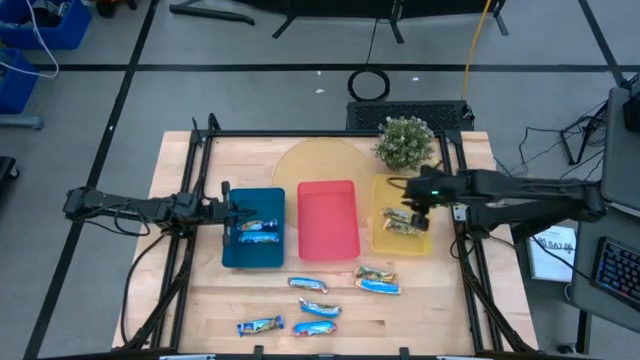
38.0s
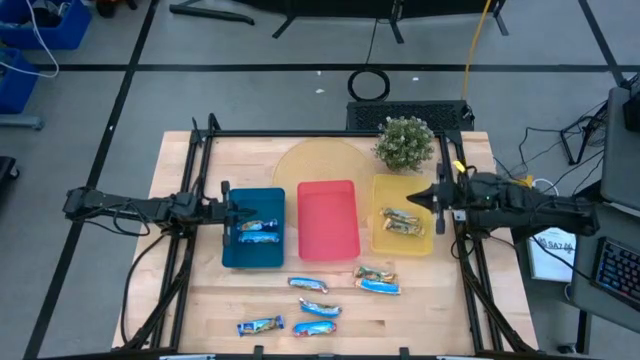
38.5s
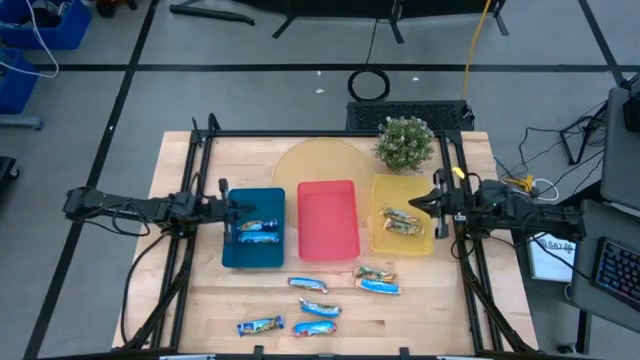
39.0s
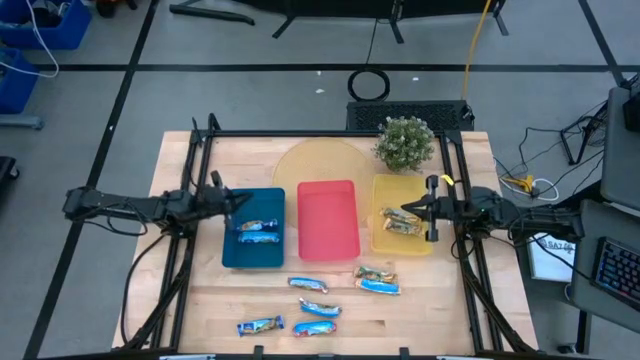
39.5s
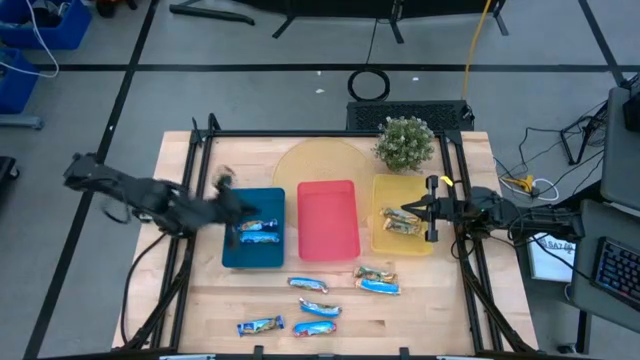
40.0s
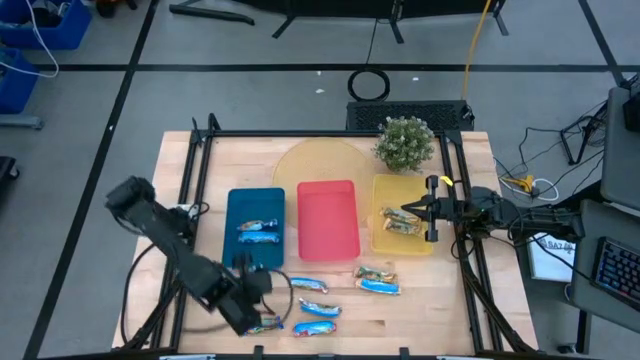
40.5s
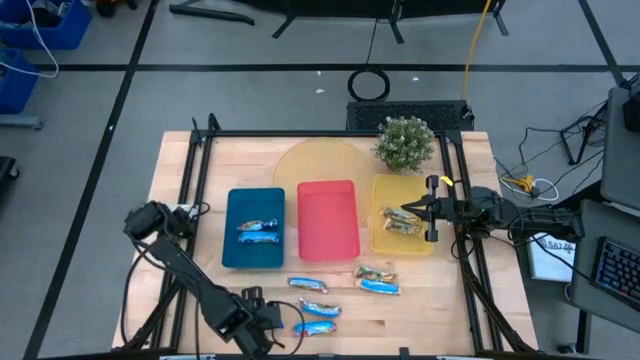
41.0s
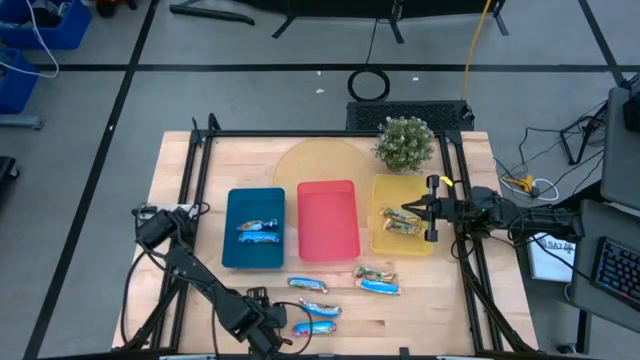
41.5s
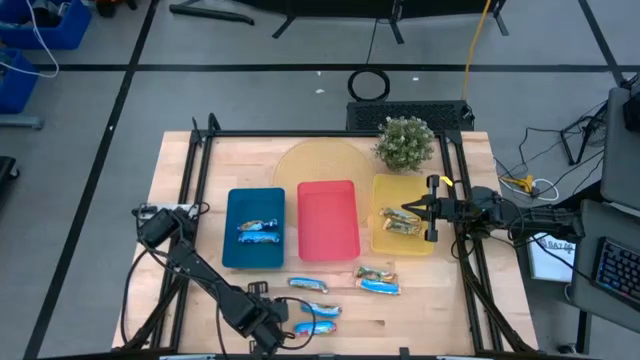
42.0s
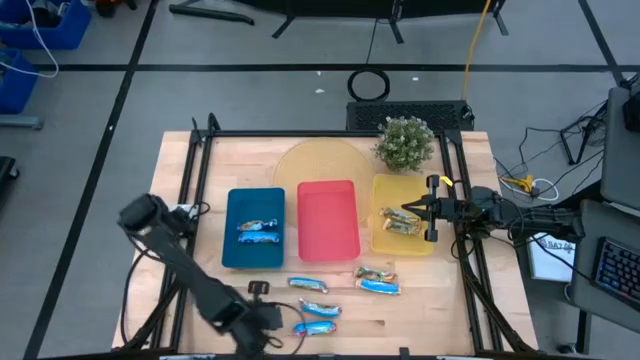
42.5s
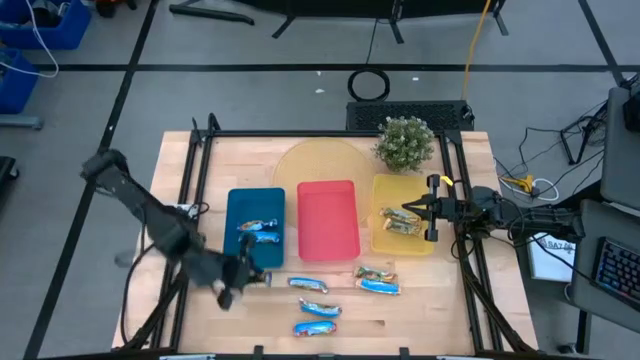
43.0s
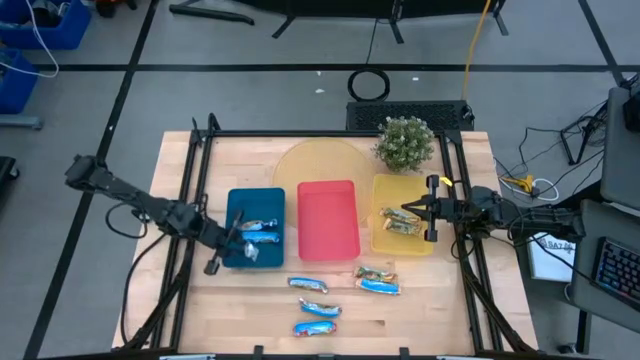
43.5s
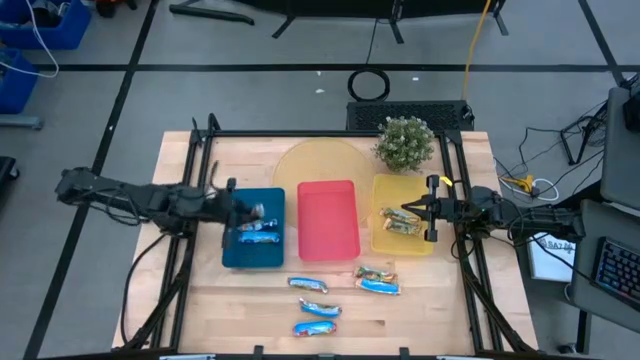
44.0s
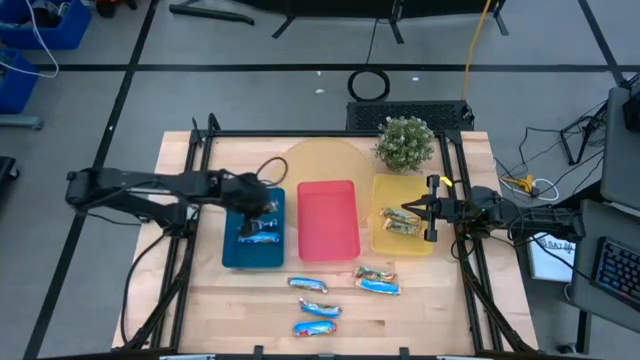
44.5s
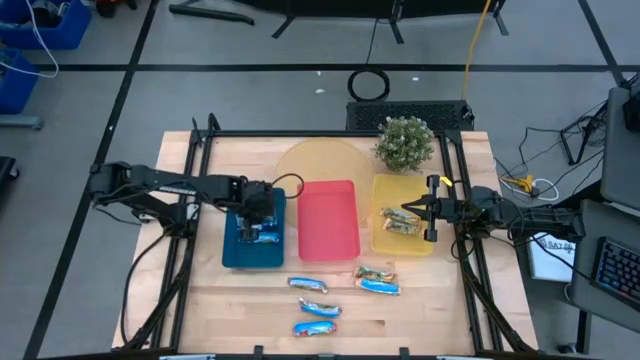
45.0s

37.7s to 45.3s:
Task: Pick and place Granola Bars by type
Put the blue granola bar into the blue bin

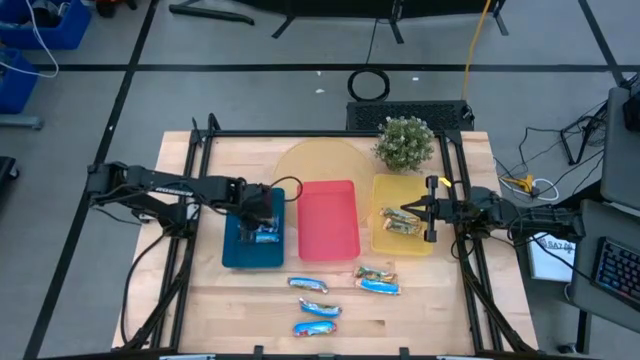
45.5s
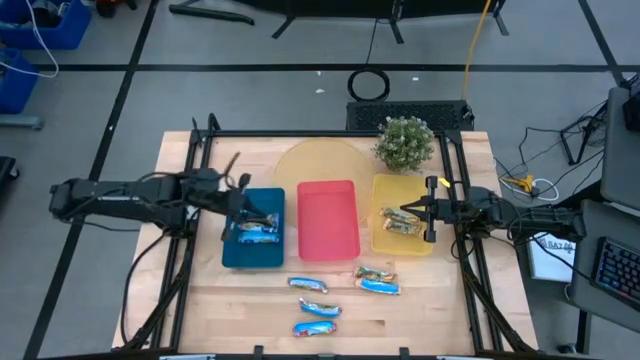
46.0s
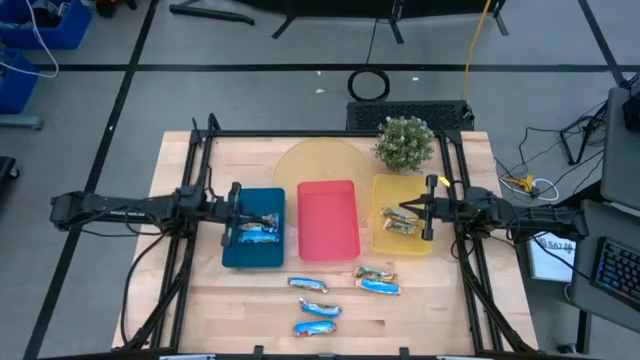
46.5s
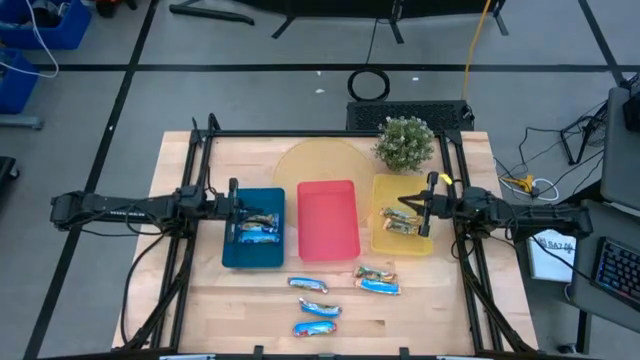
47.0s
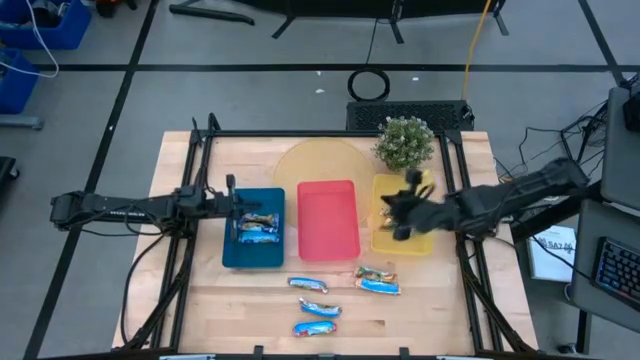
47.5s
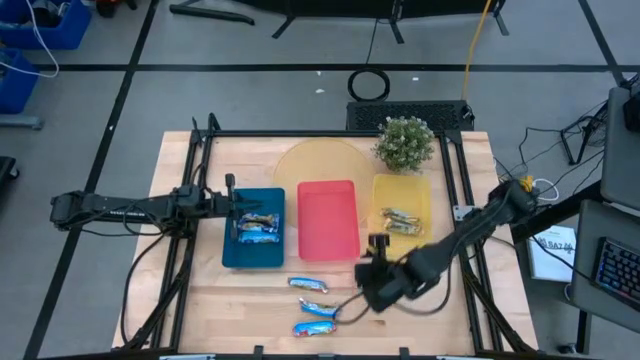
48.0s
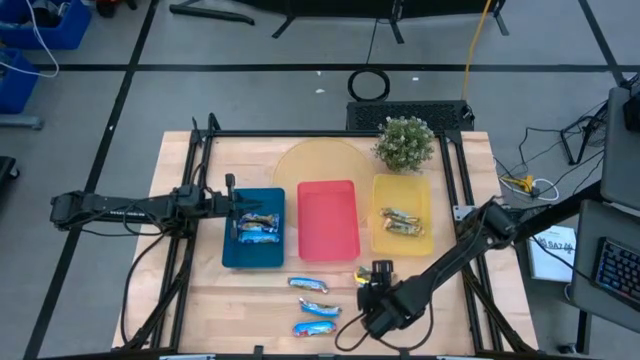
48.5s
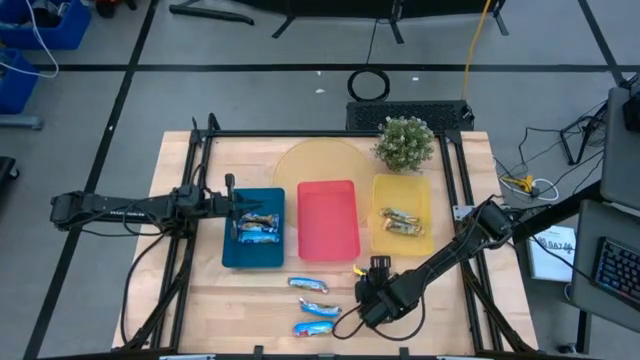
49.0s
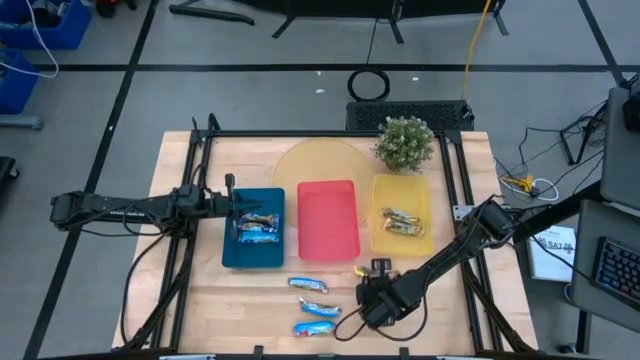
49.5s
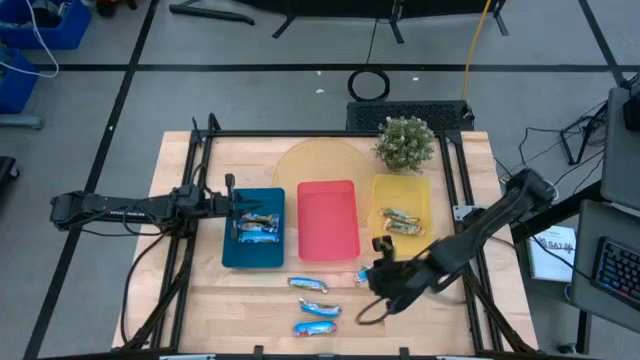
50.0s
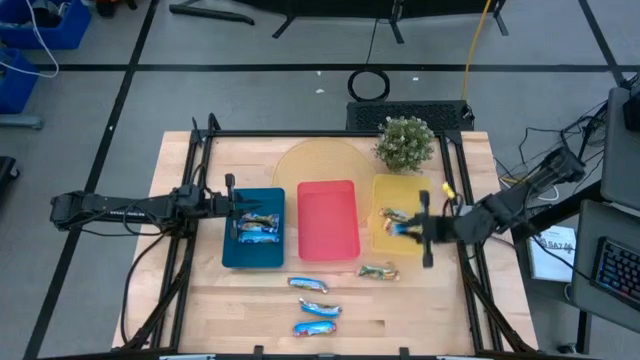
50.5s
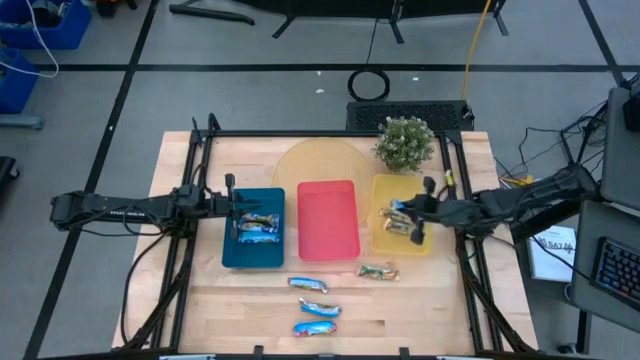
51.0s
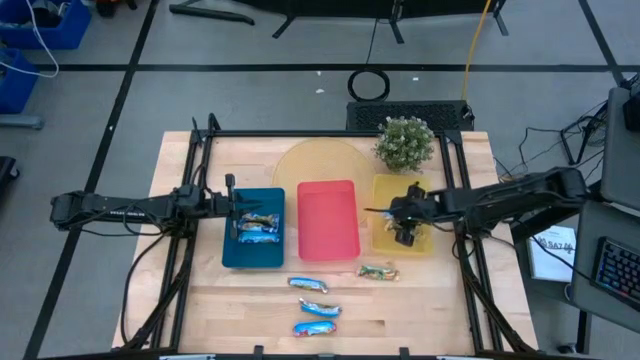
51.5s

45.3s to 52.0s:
Put the yellow granola bar into the yellow bin

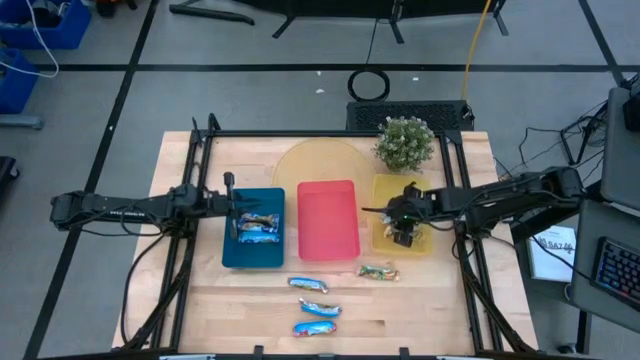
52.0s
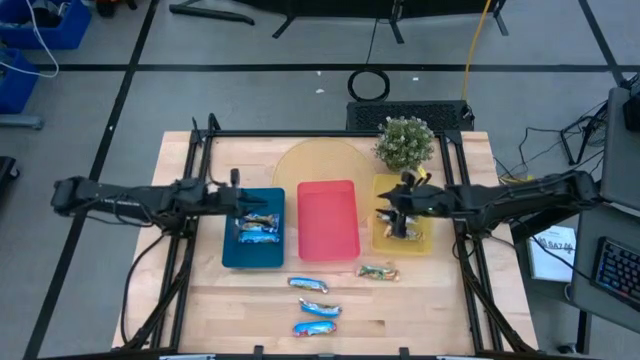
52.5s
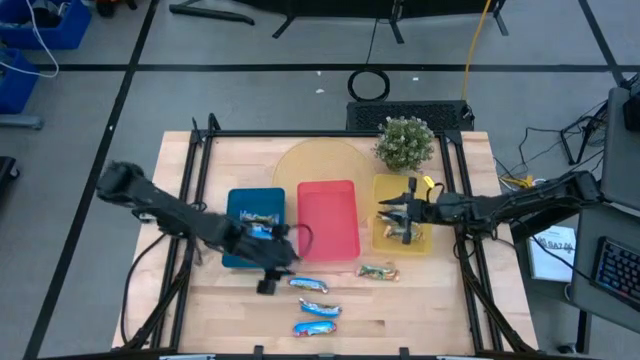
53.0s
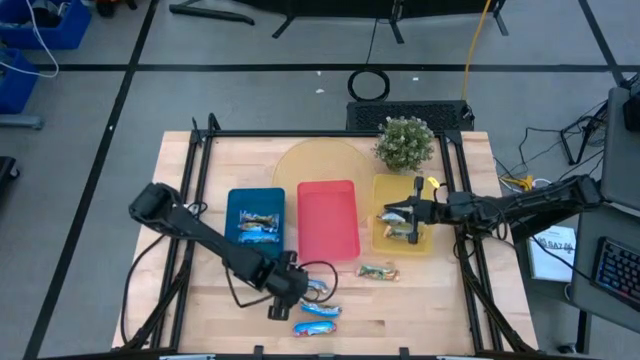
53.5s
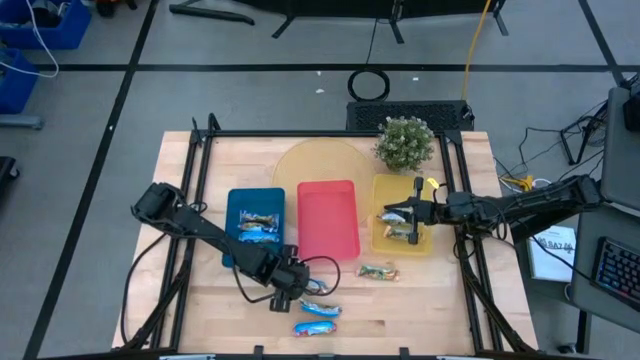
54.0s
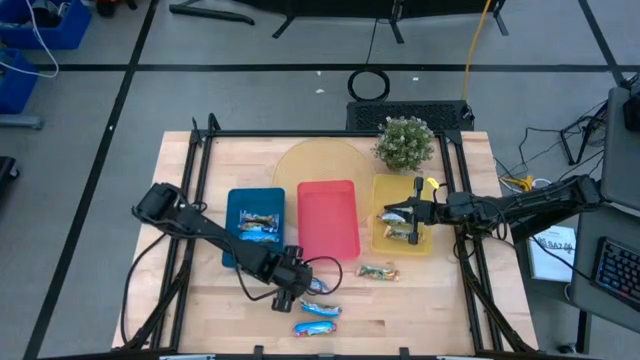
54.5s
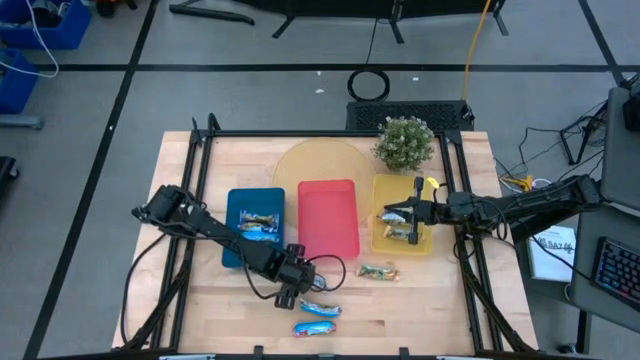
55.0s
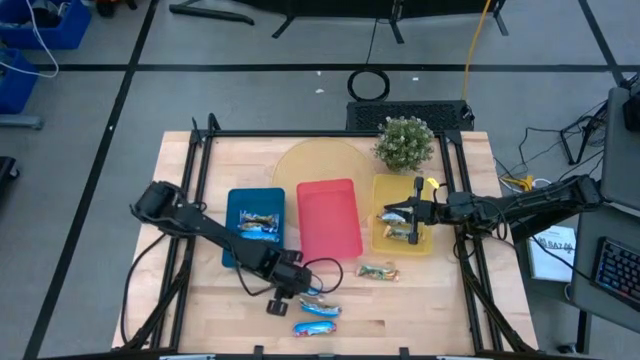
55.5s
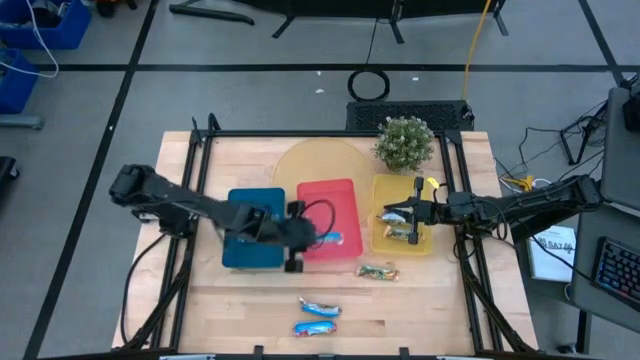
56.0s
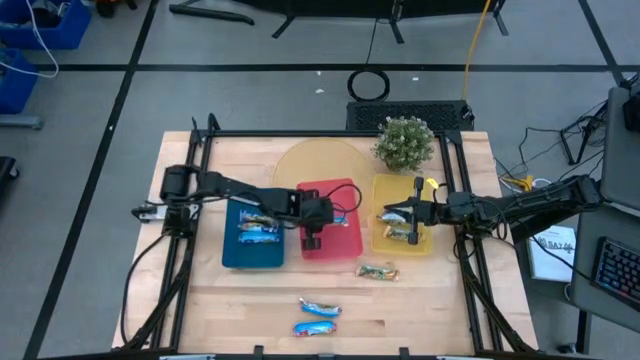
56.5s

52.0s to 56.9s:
Put the red granola bar into the red bin

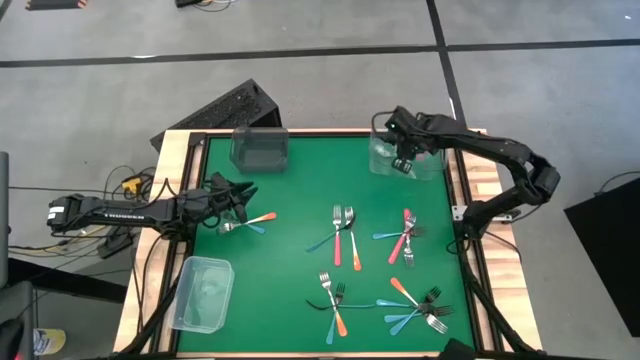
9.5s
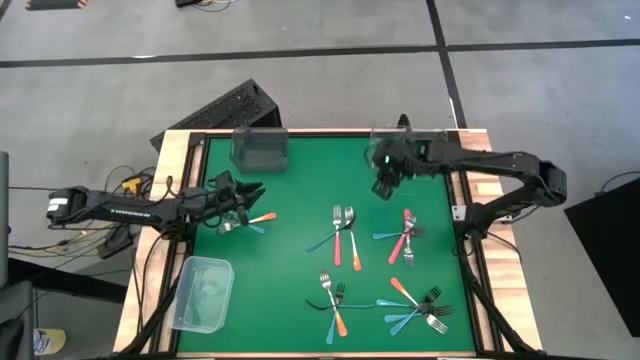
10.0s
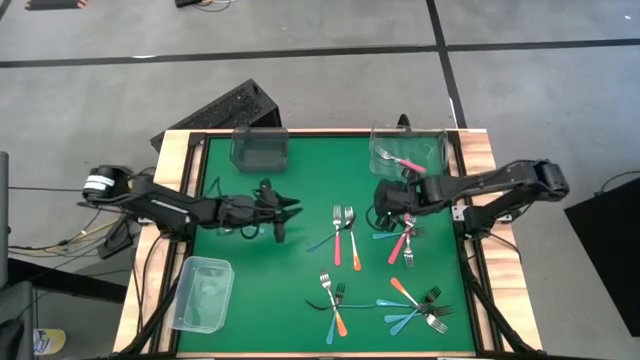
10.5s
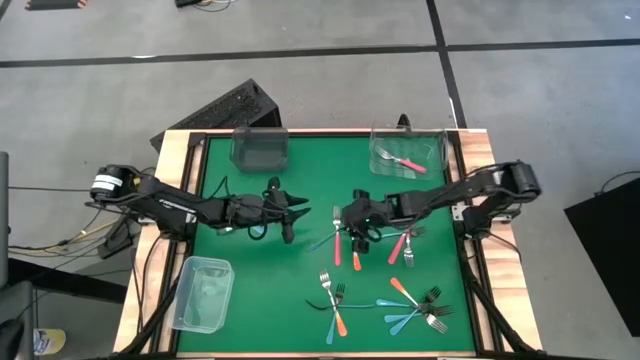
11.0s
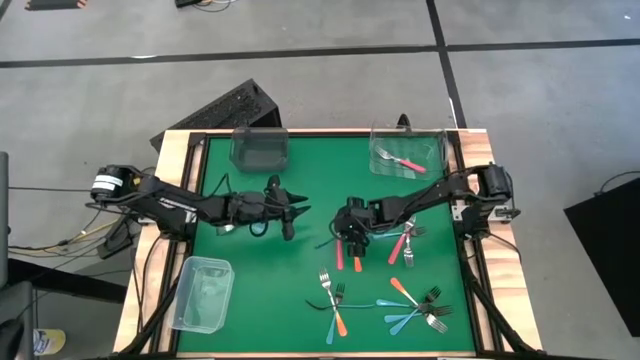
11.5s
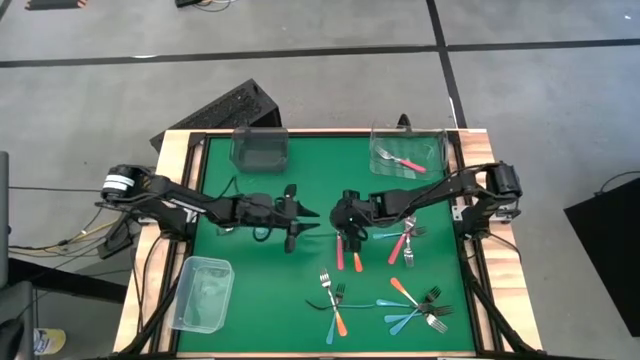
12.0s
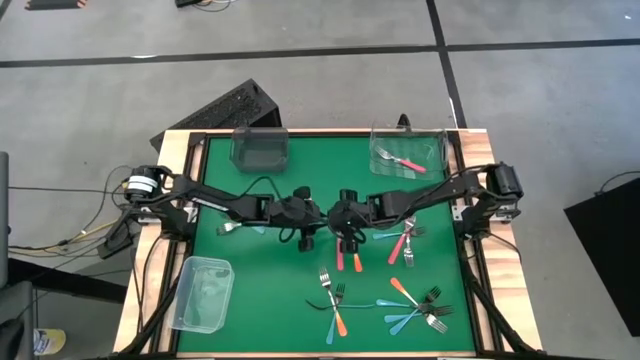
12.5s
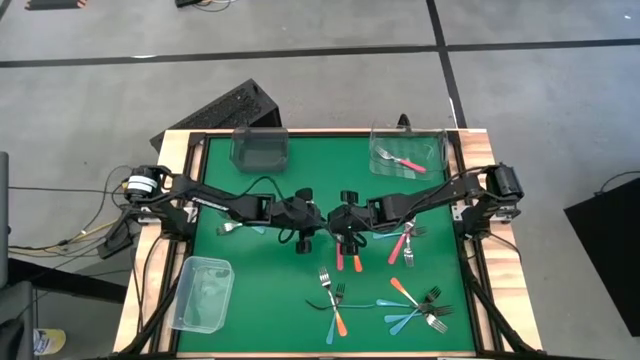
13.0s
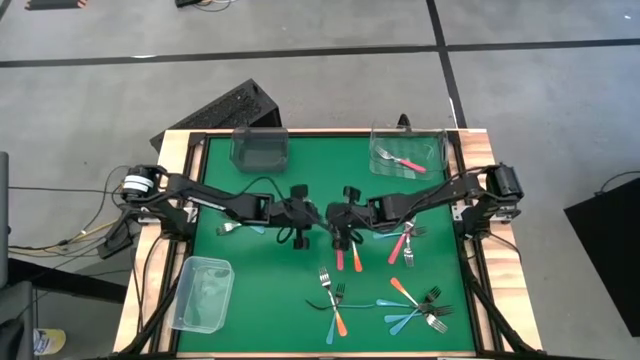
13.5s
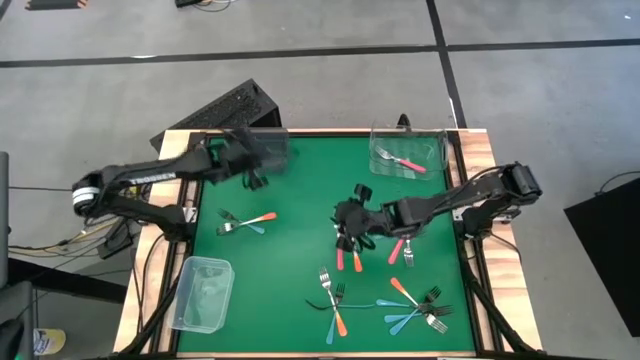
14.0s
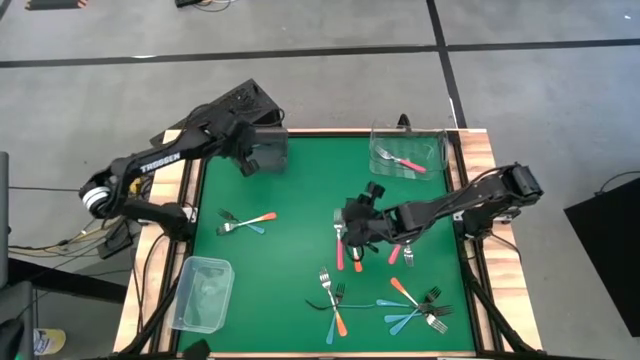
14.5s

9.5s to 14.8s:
Task: Sort silverware by color (type)
Put the blue fork into the black bin
